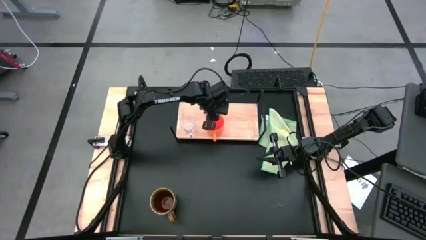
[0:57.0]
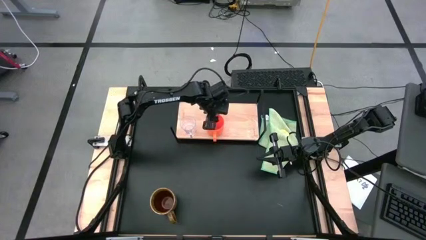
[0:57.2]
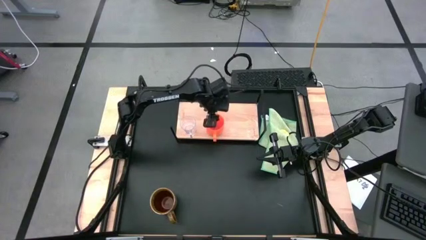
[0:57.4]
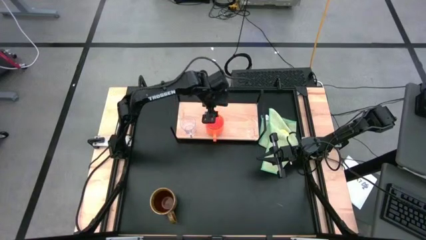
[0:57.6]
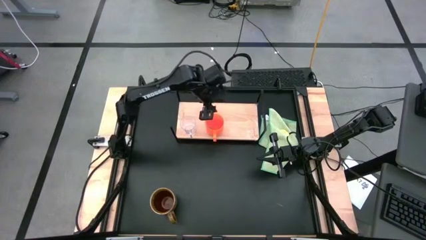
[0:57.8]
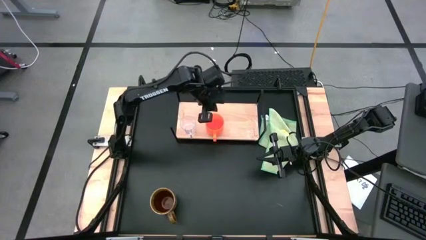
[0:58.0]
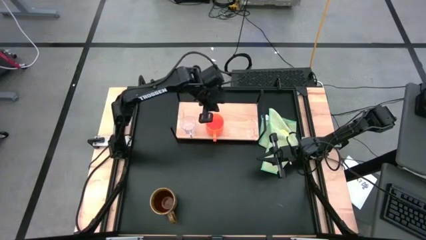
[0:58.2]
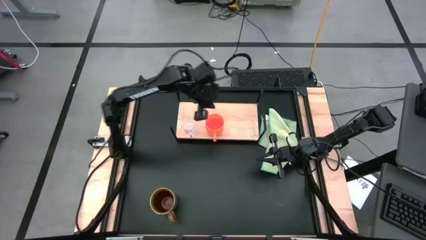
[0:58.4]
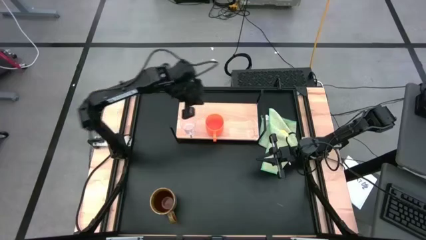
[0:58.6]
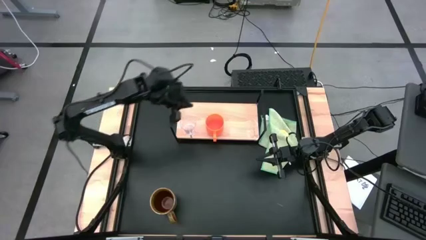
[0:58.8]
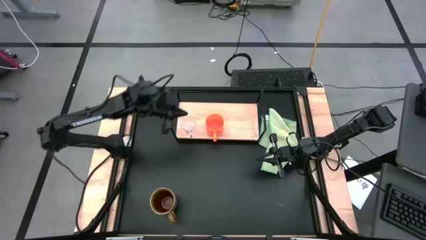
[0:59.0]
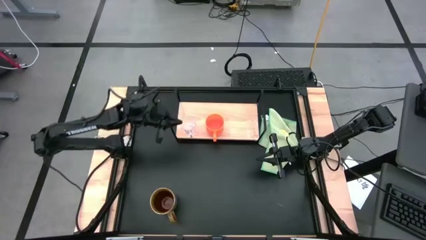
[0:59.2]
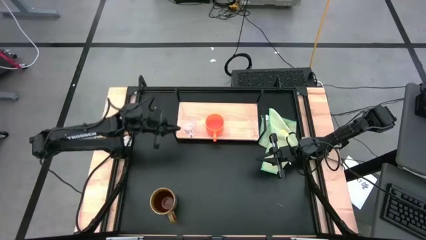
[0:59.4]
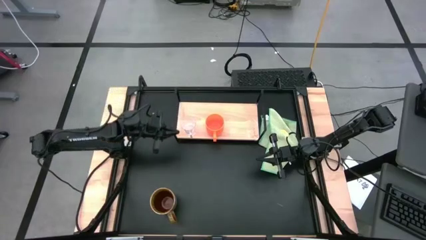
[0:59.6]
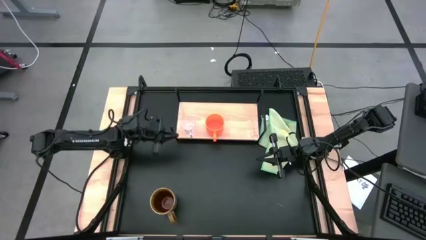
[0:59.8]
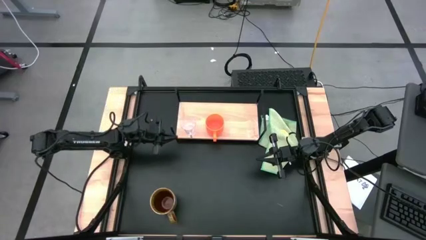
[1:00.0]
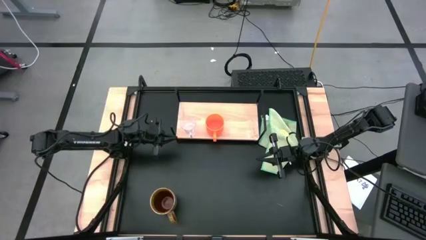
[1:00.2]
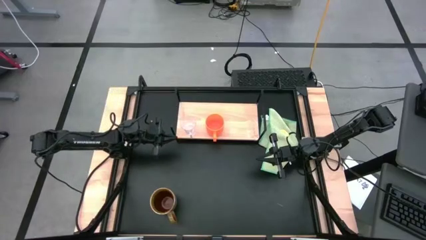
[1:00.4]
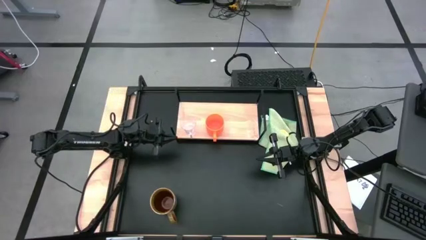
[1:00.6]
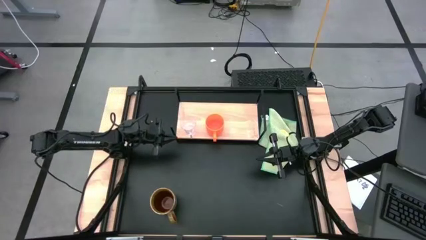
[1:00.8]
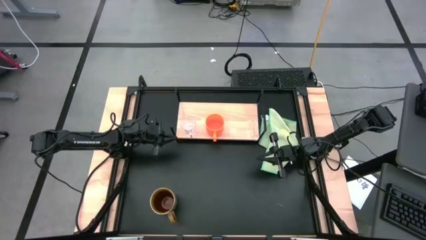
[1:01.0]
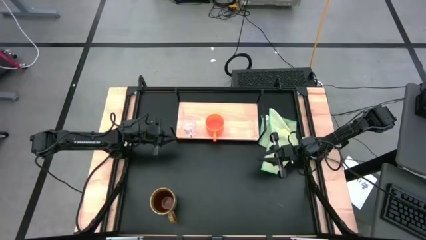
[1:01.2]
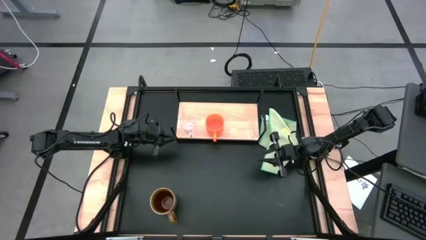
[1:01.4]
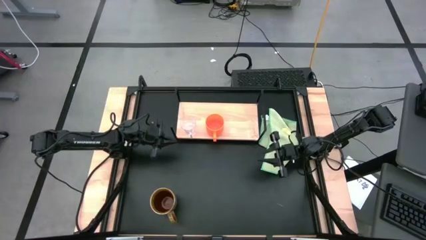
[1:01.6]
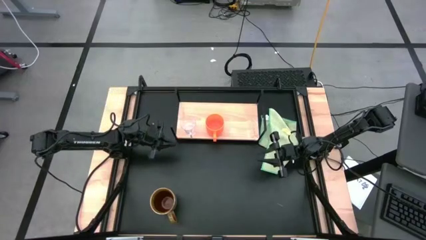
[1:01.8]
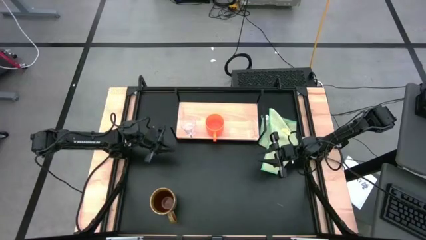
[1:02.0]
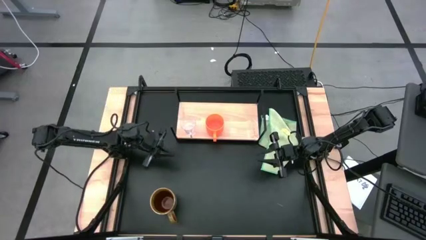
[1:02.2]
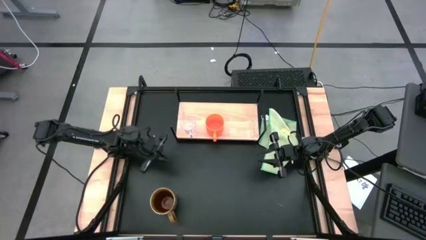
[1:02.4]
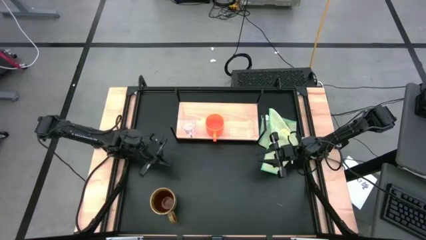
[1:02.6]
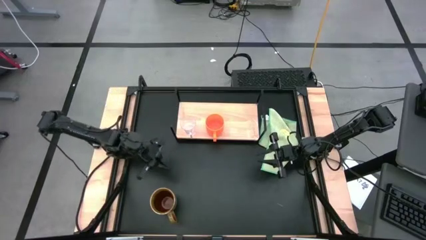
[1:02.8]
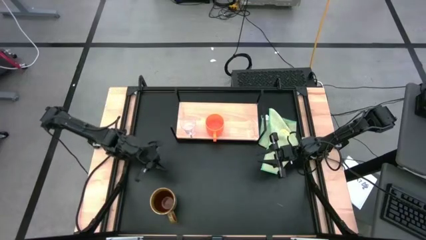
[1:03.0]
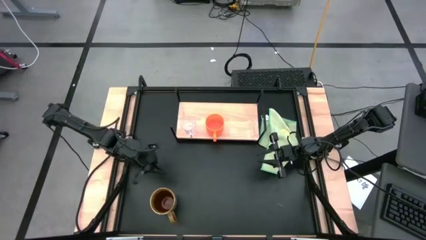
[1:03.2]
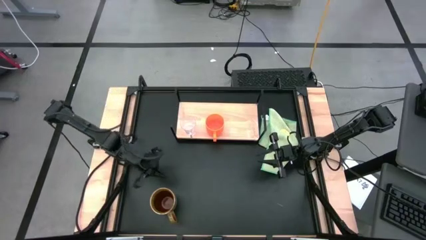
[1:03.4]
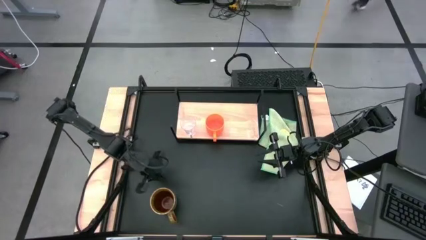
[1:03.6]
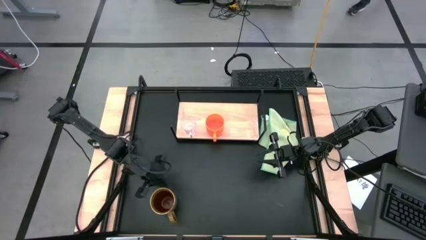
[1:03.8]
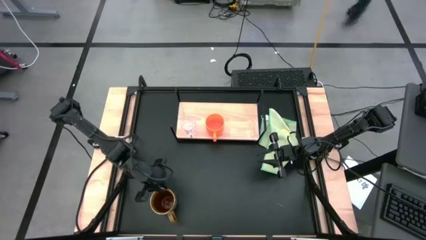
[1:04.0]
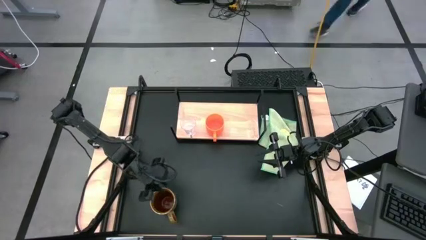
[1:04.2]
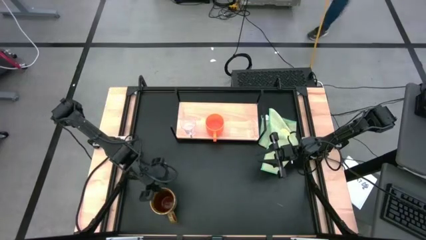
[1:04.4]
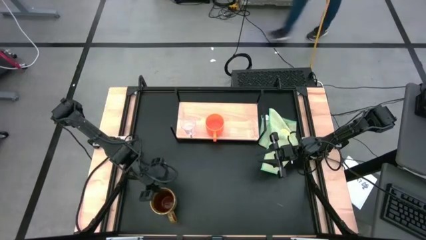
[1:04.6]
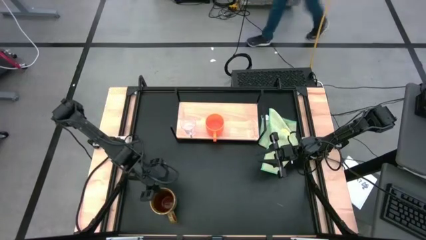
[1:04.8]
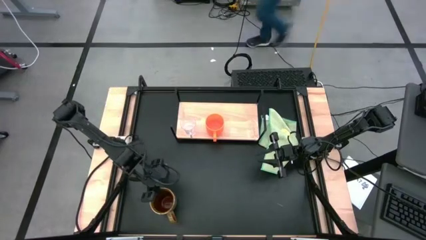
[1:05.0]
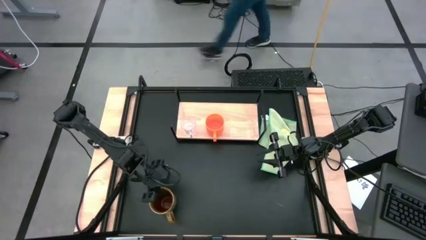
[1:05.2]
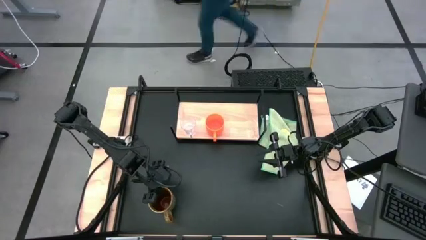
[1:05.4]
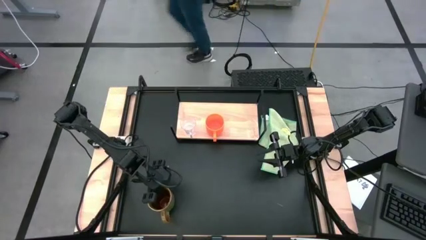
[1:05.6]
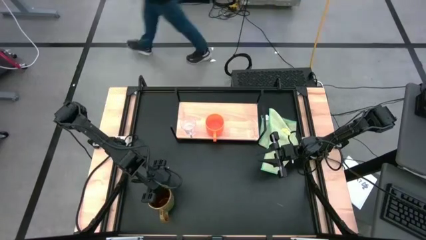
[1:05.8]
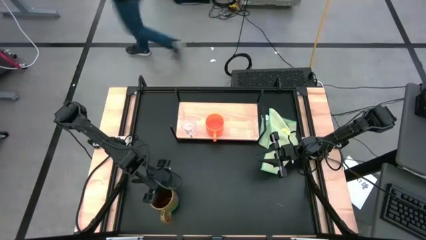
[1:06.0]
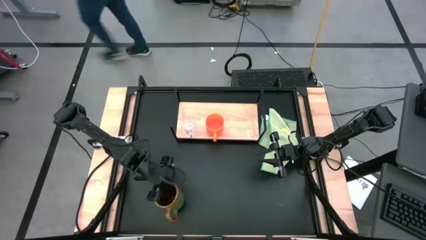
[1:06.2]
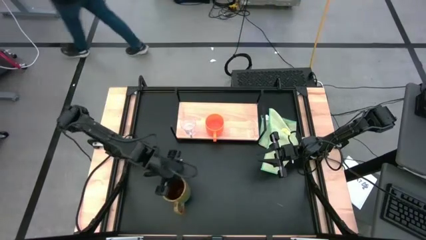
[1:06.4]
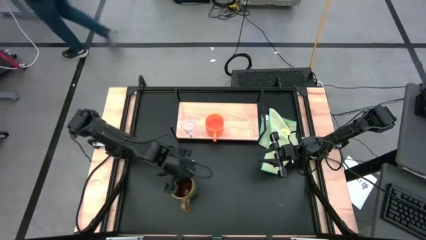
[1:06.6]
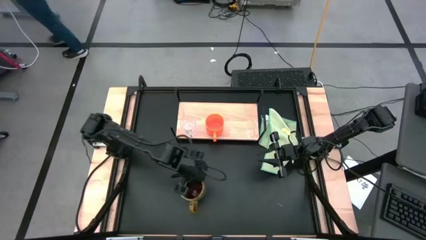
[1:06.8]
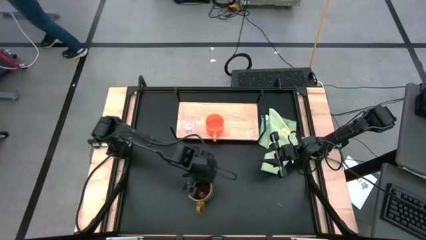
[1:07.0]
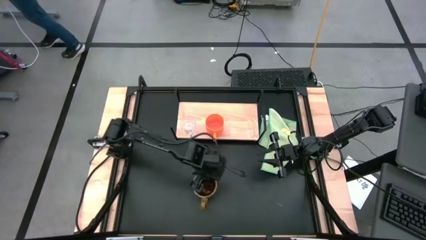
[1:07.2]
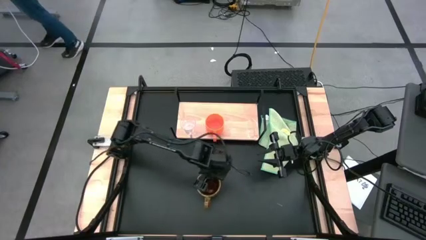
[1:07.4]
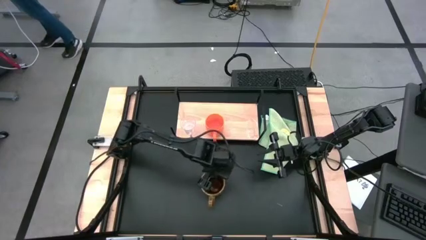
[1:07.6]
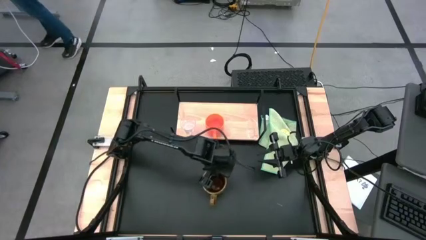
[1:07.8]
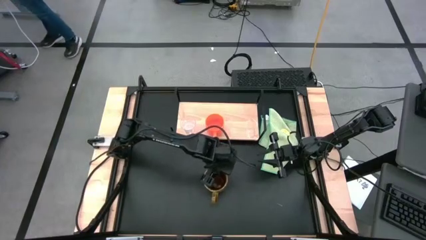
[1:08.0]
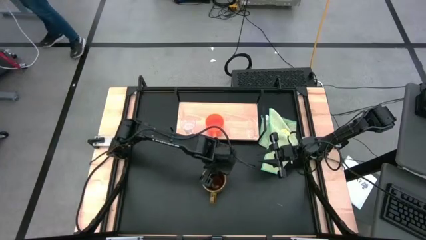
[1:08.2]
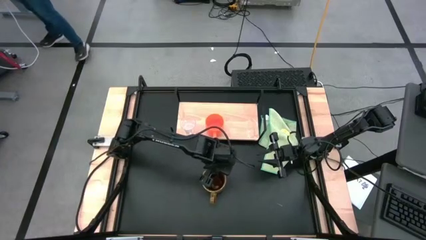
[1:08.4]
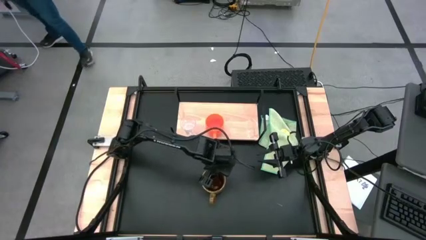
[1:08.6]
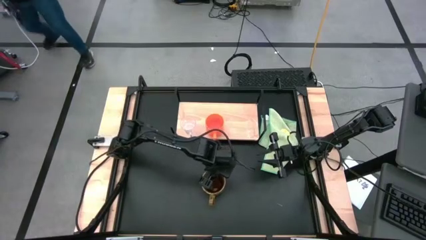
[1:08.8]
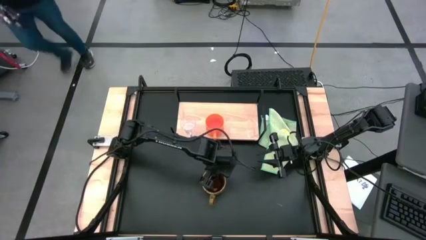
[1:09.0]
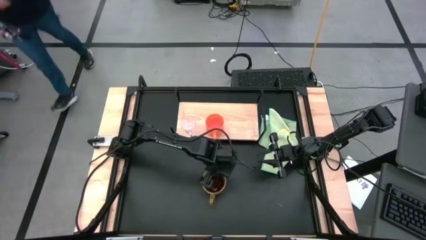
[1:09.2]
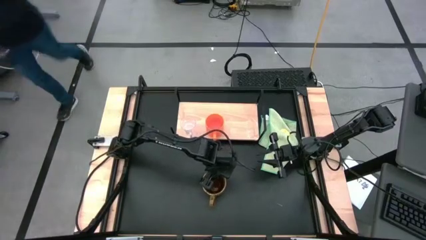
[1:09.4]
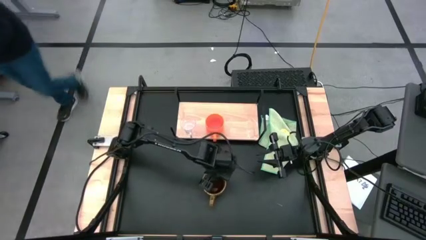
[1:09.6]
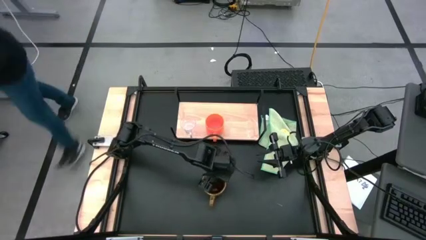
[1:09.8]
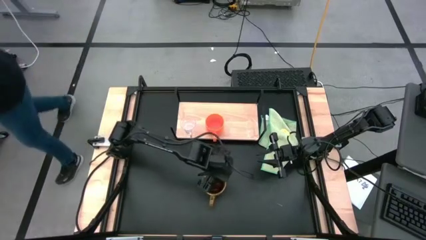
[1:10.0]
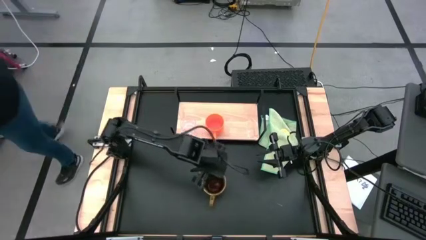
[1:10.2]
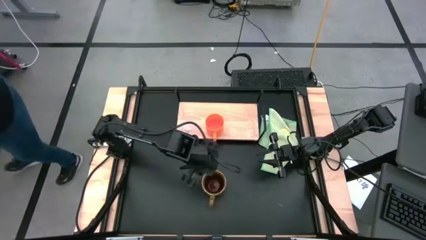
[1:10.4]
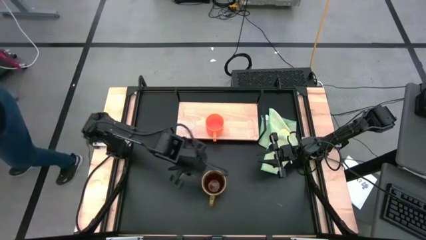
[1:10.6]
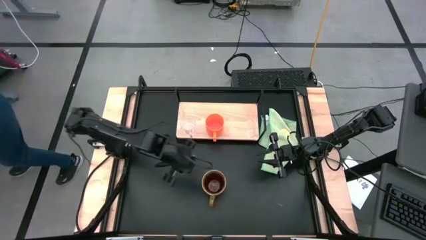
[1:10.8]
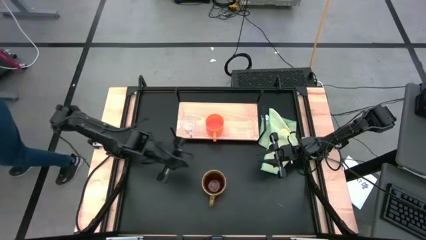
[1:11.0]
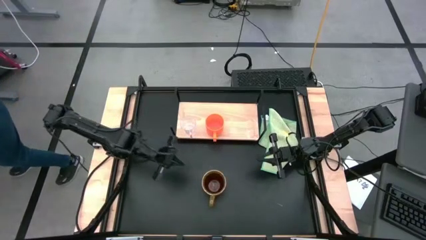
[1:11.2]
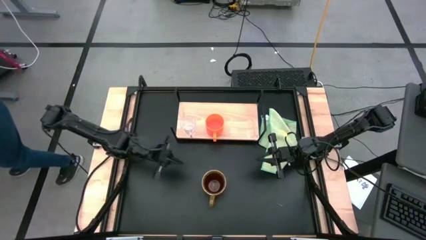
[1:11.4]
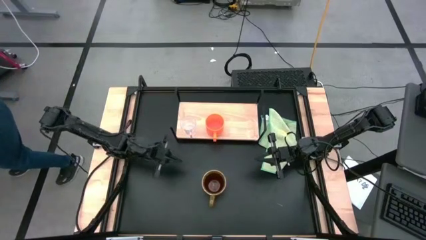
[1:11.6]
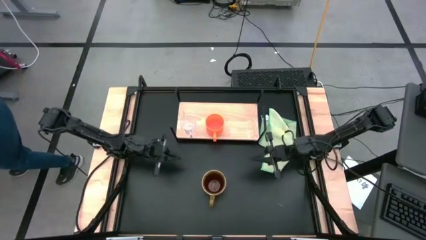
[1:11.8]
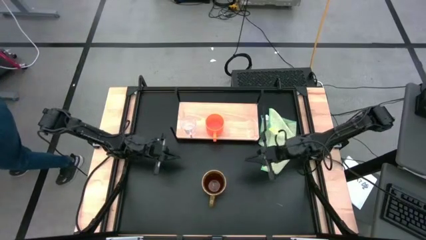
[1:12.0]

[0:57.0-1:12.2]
Task: Stack small to large cups/mugs on shelf
Put the green mug on the shelf
